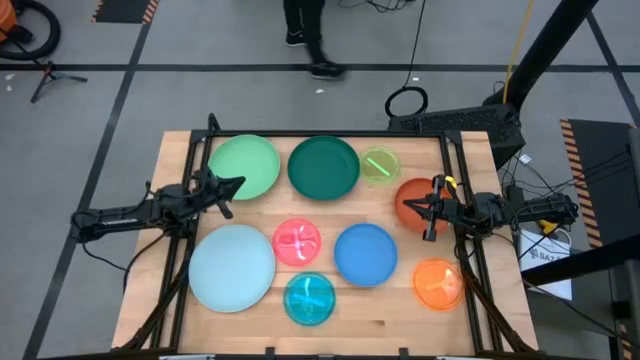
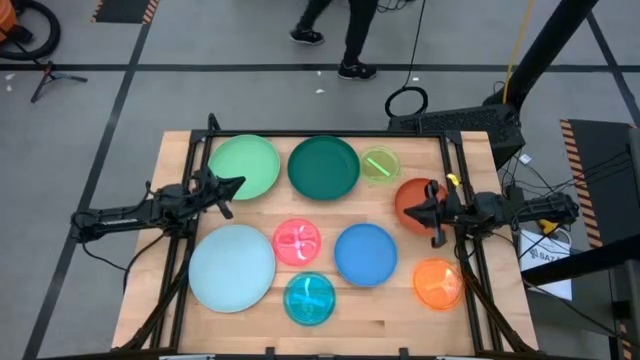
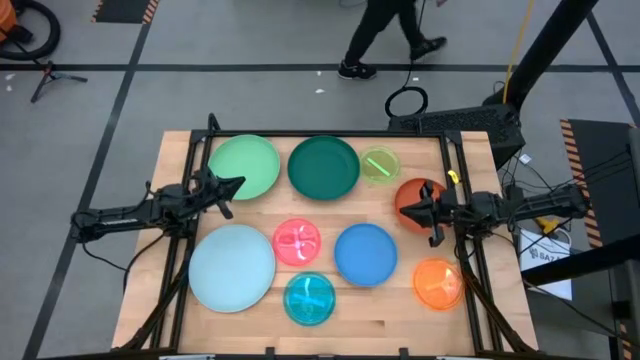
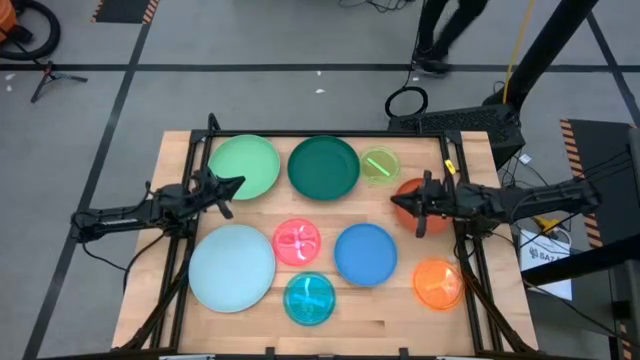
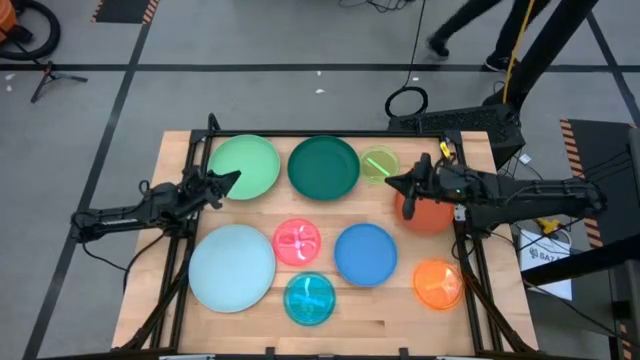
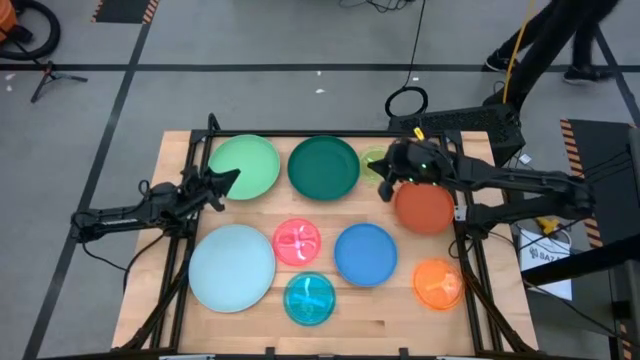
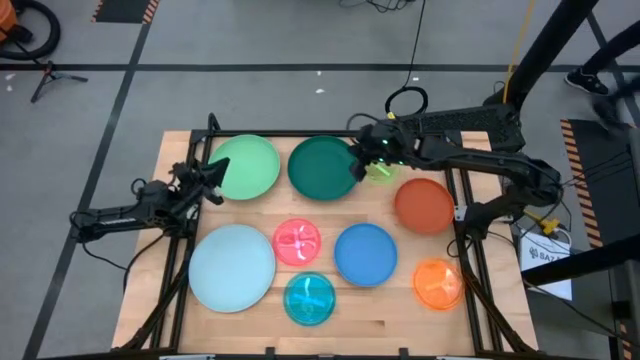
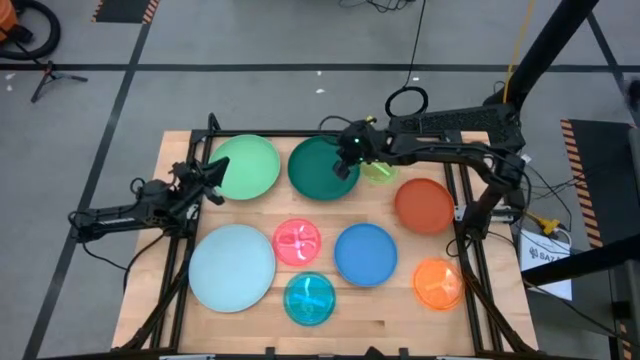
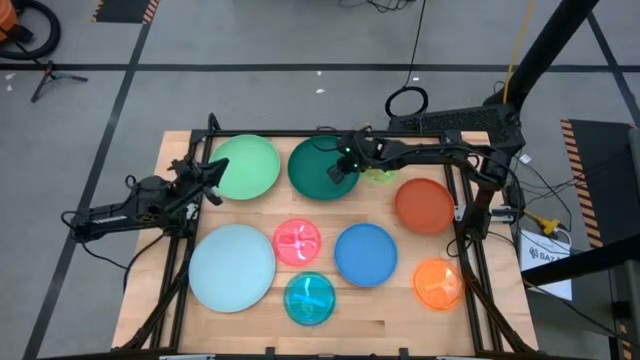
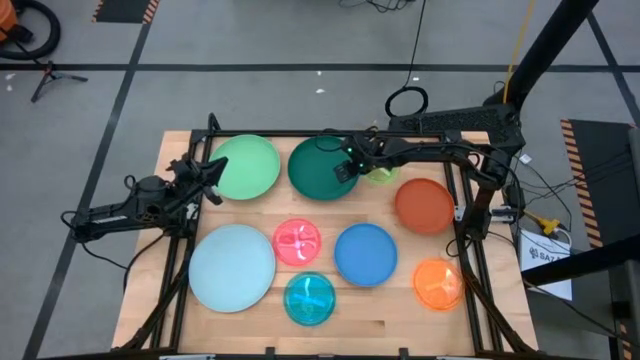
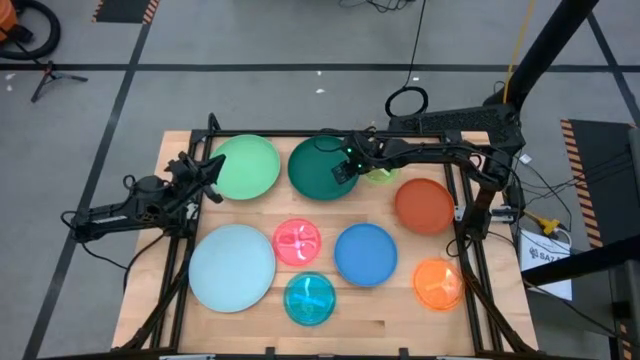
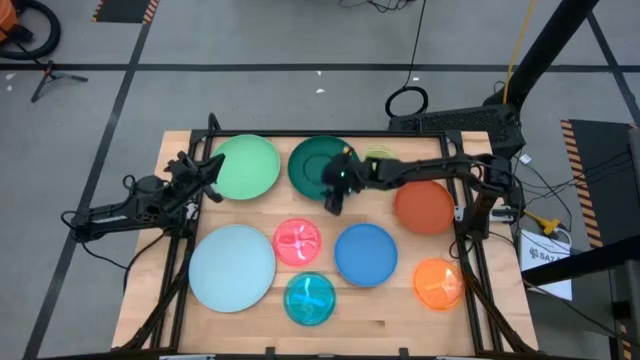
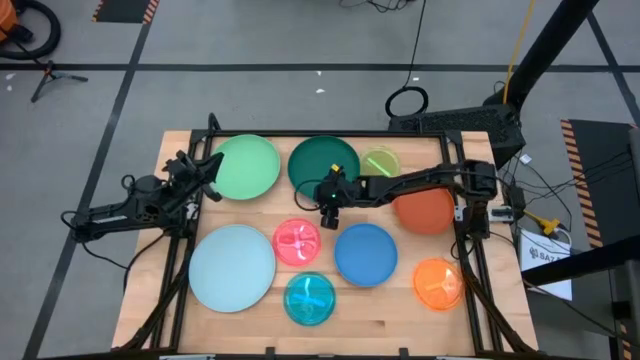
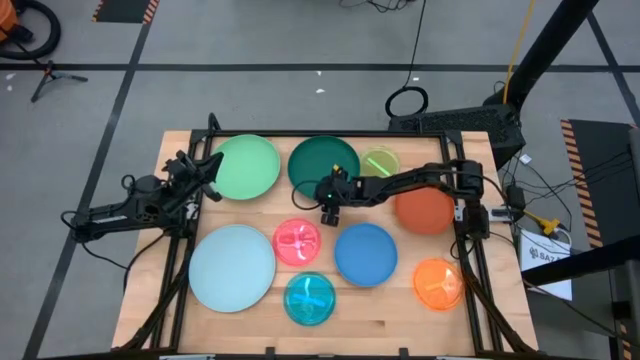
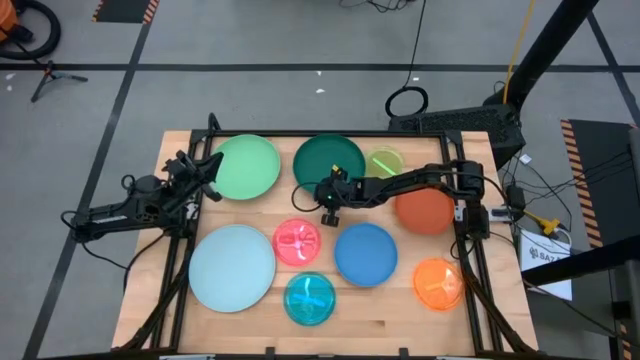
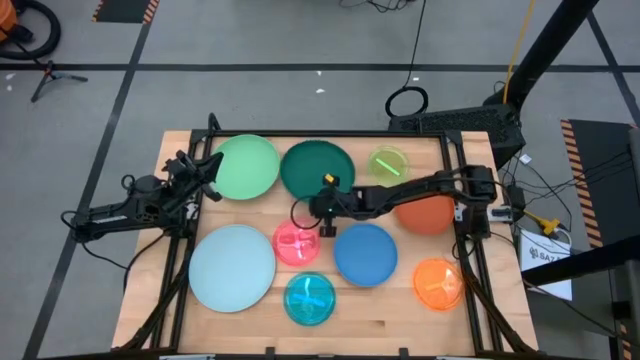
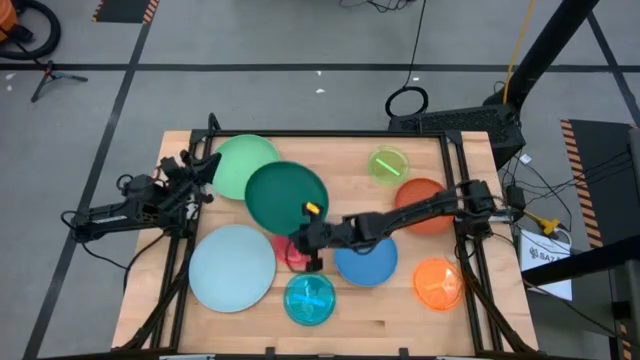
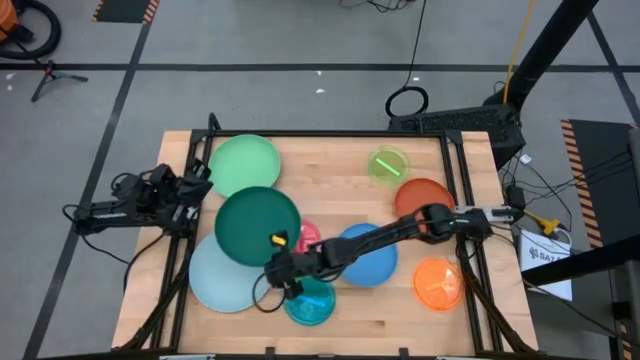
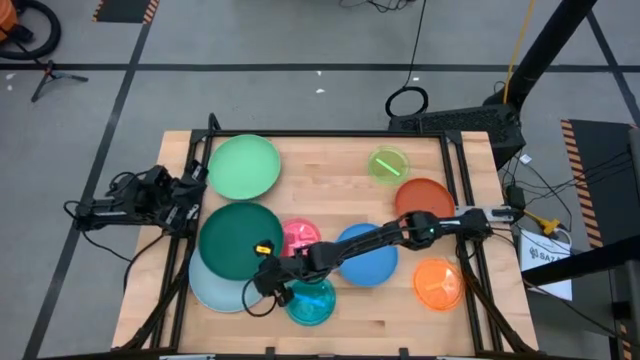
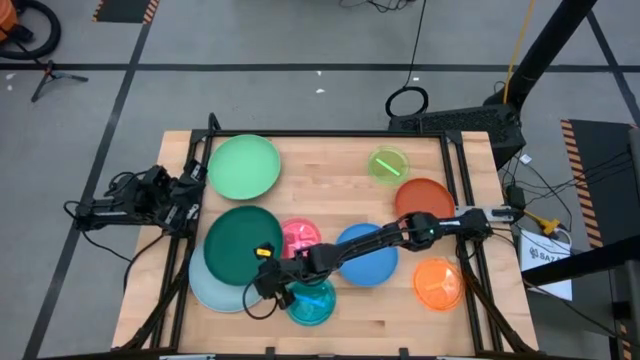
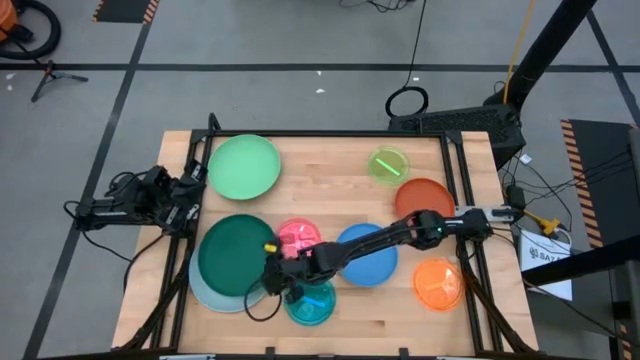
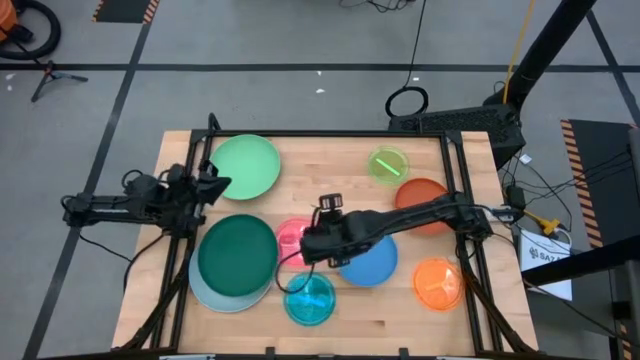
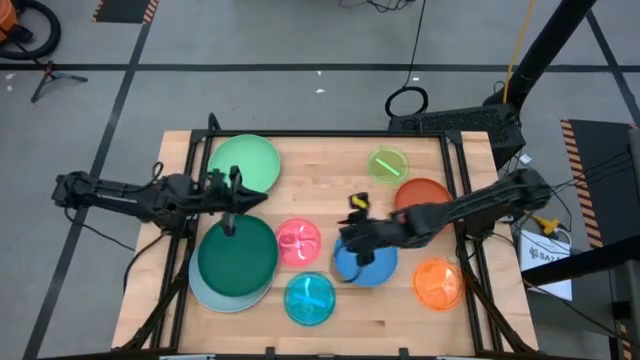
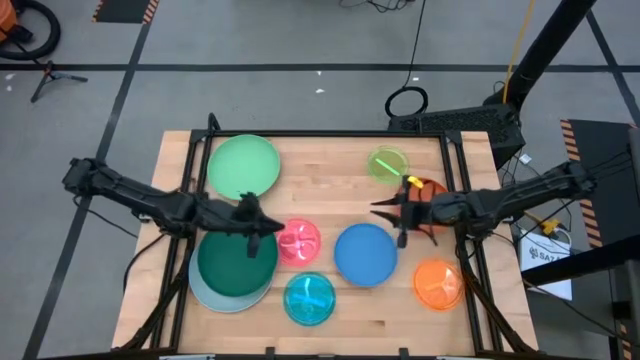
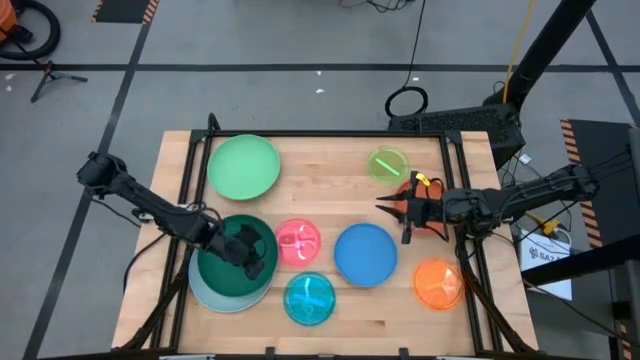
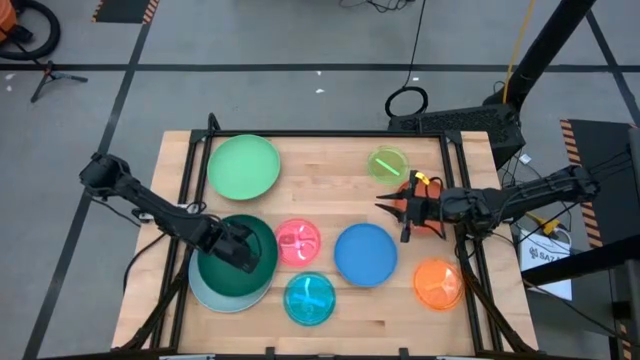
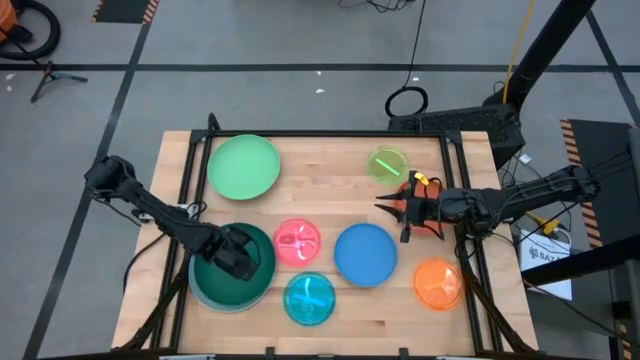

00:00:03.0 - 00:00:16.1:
Task: Stack plastic plates
Stack the dark green plate on top of the gray plate

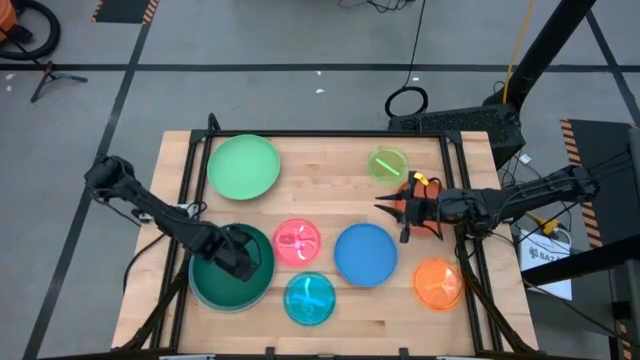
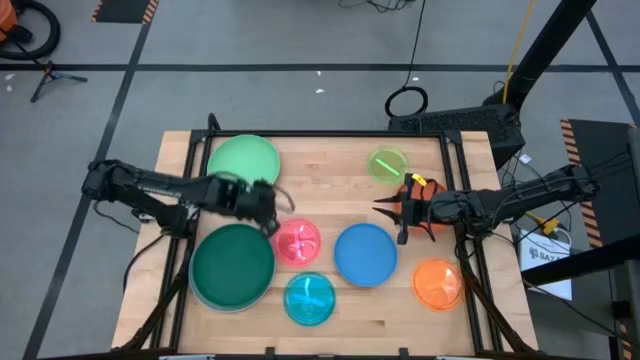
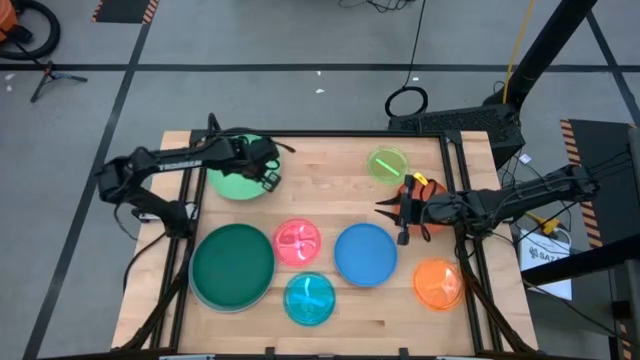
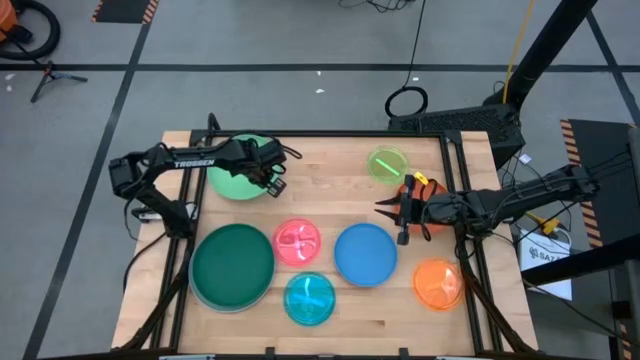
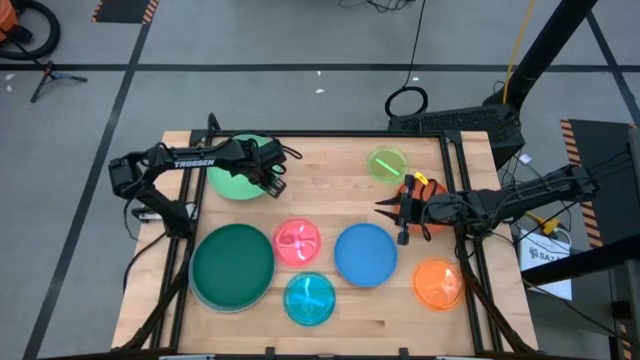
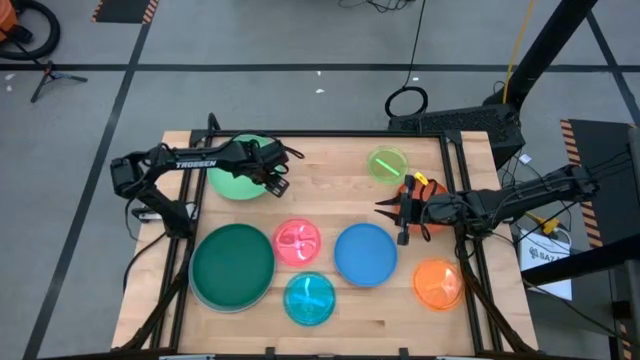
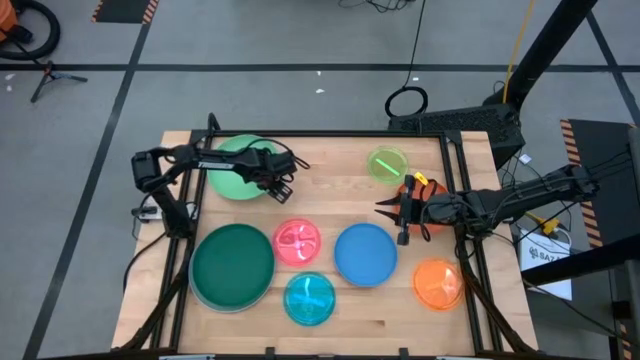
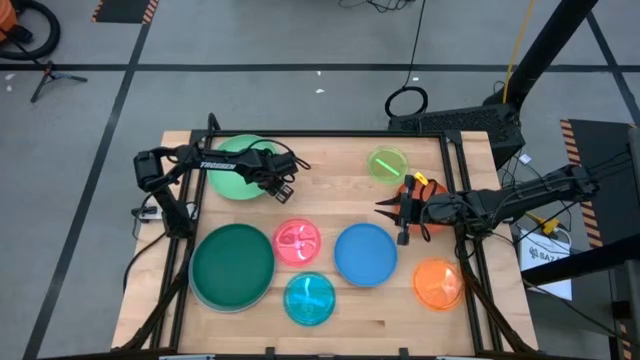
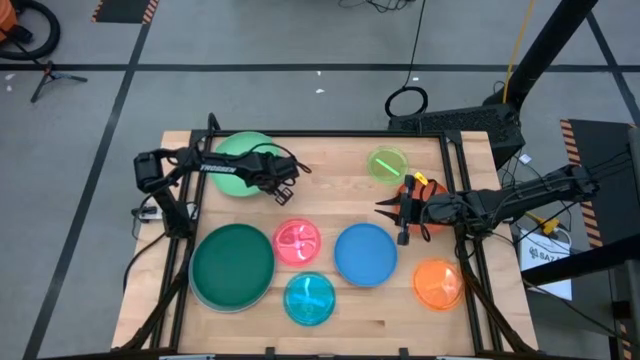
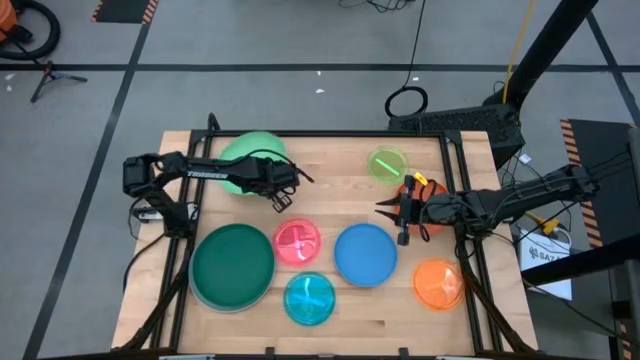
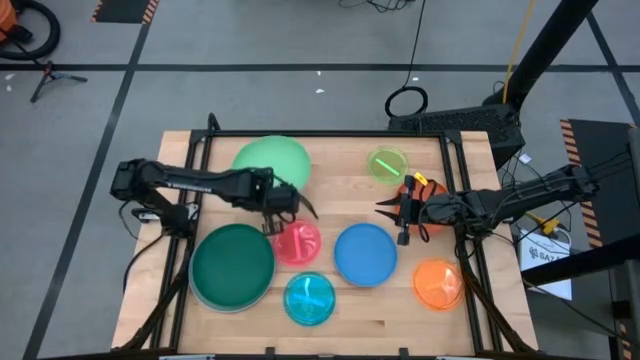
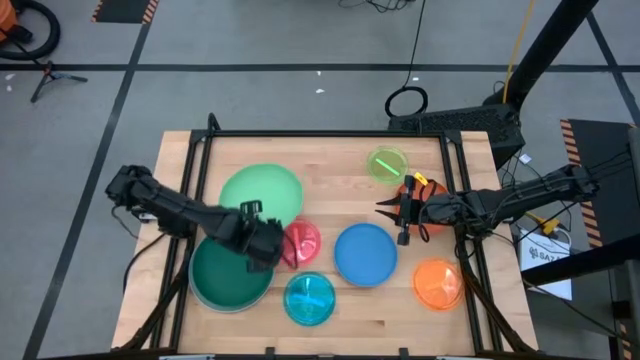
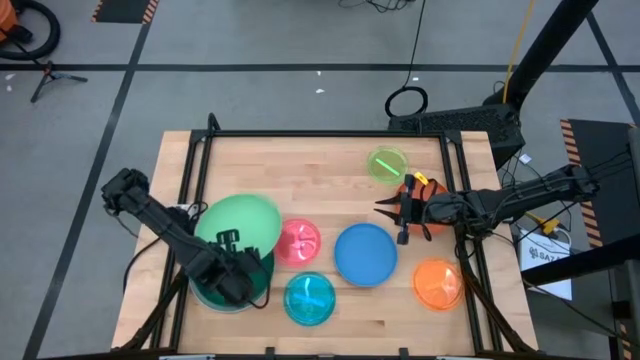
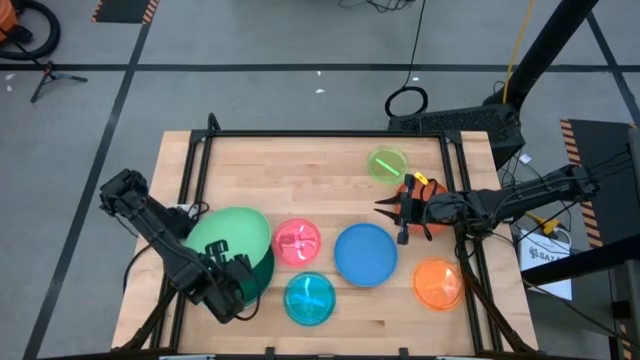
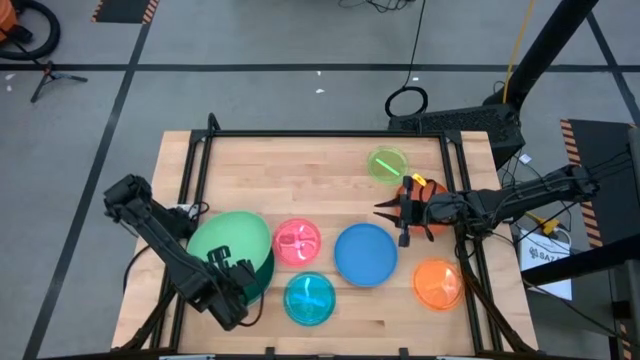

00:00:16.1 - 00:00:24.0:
Stack the green plate on top of the dark green plate
